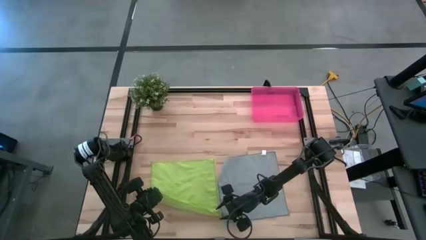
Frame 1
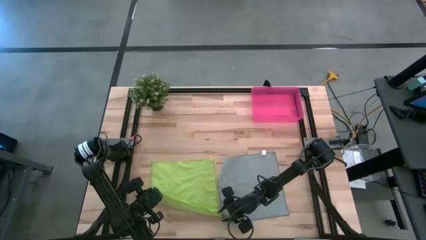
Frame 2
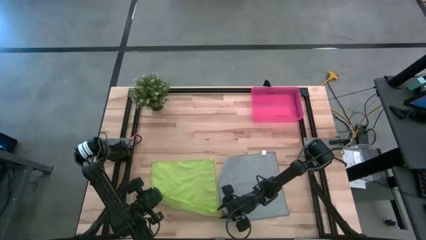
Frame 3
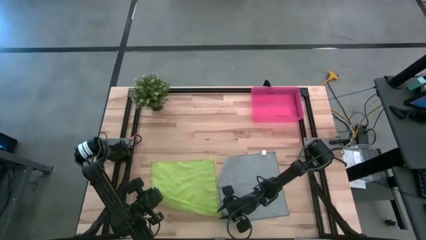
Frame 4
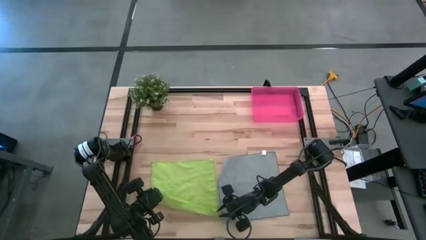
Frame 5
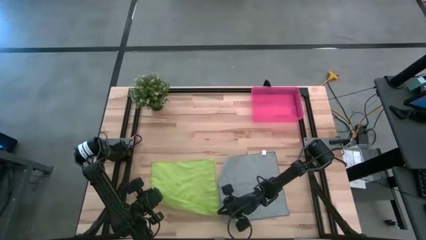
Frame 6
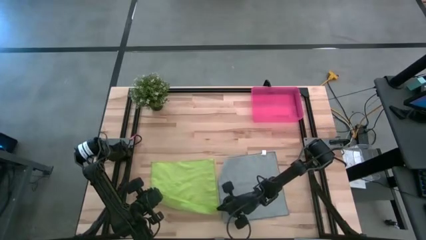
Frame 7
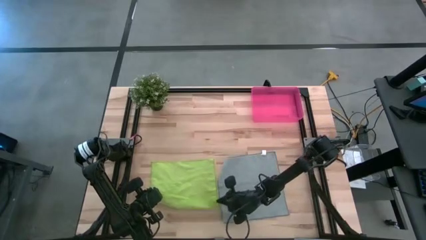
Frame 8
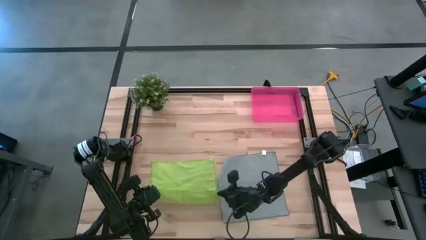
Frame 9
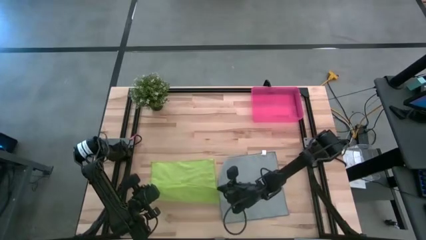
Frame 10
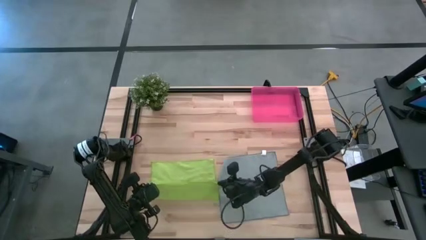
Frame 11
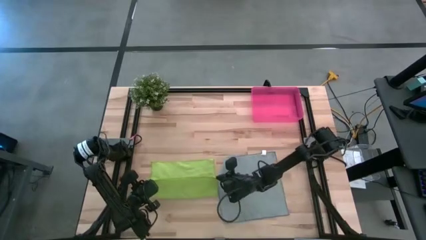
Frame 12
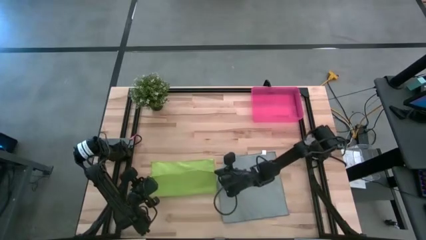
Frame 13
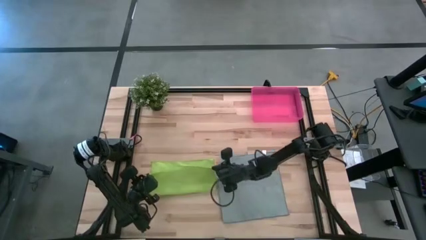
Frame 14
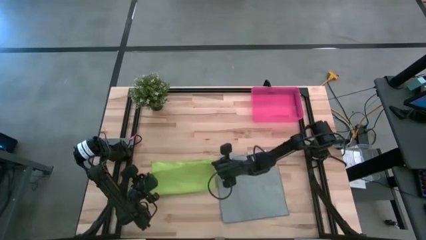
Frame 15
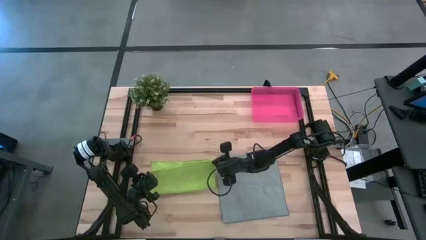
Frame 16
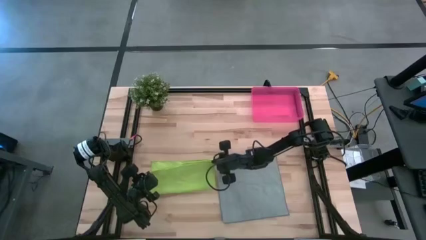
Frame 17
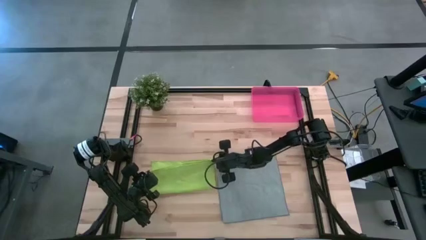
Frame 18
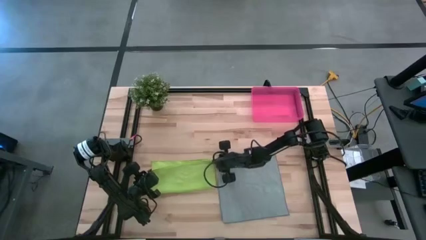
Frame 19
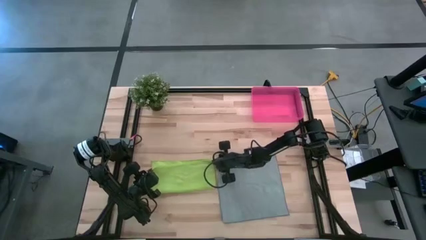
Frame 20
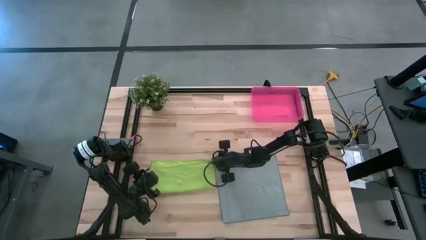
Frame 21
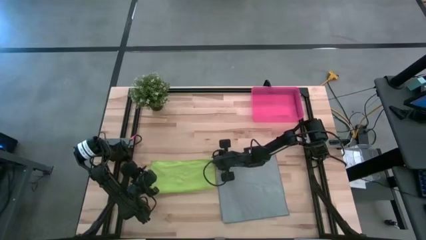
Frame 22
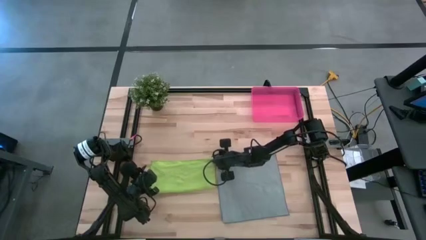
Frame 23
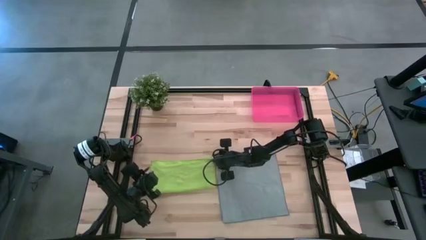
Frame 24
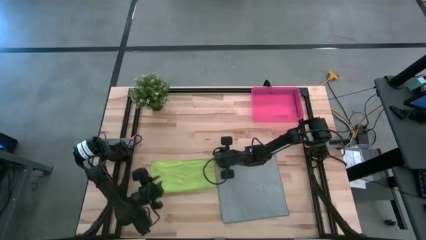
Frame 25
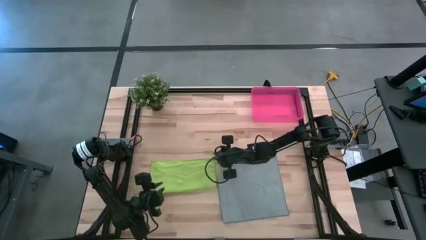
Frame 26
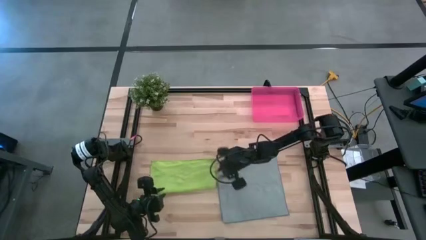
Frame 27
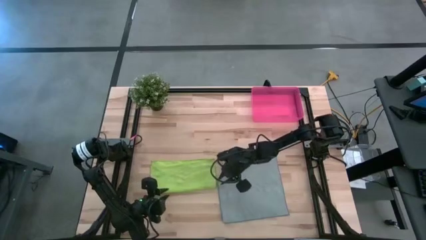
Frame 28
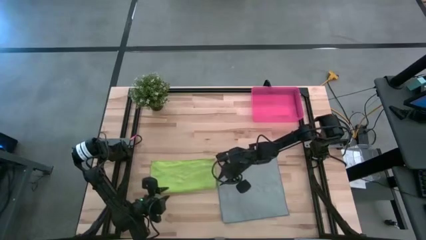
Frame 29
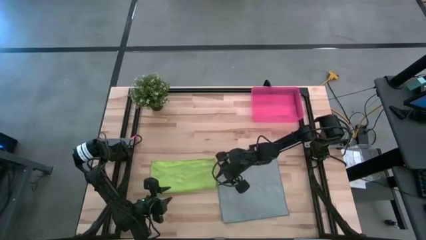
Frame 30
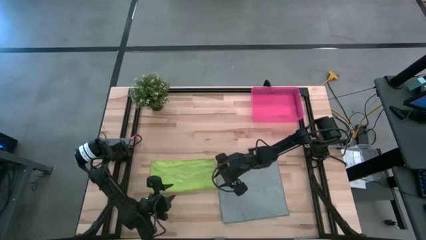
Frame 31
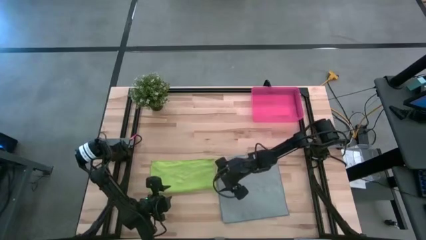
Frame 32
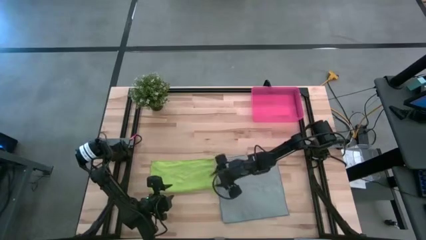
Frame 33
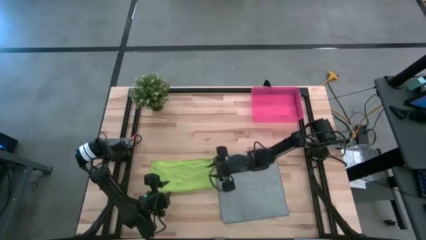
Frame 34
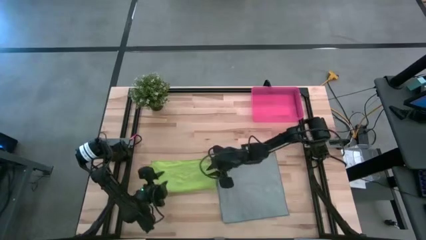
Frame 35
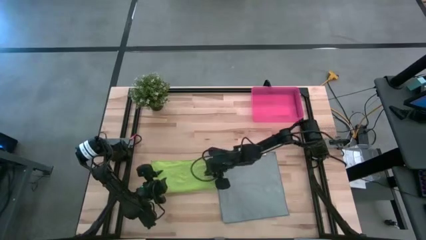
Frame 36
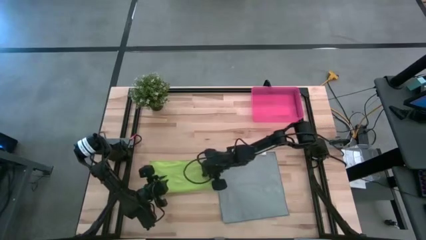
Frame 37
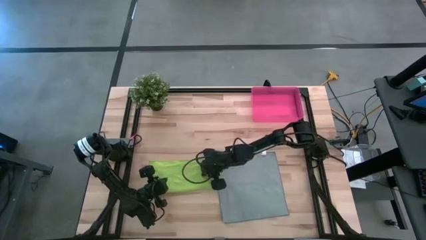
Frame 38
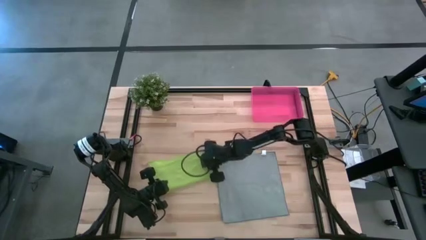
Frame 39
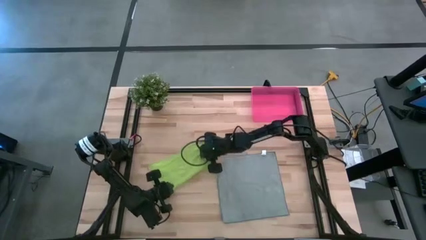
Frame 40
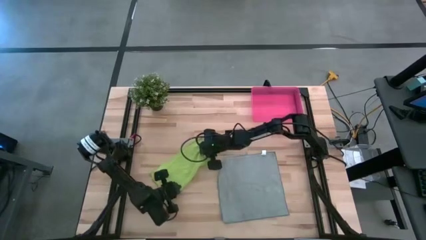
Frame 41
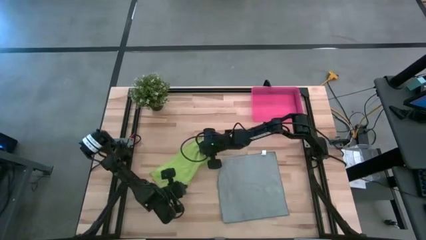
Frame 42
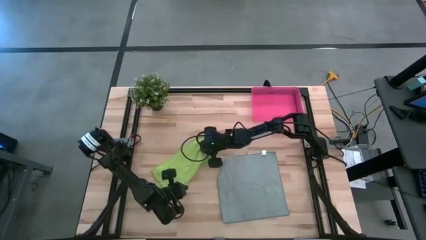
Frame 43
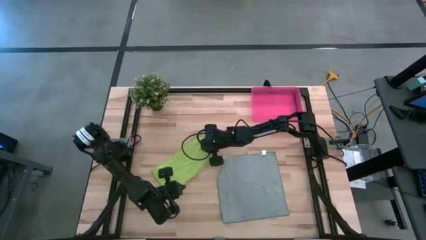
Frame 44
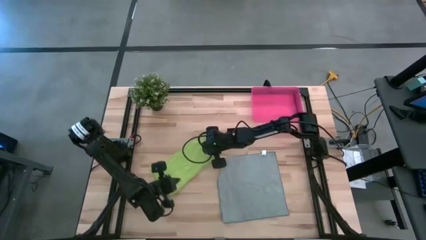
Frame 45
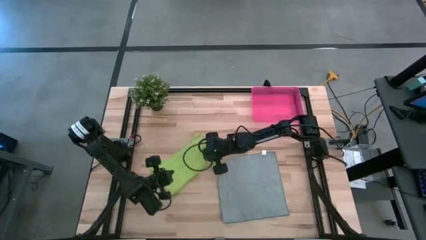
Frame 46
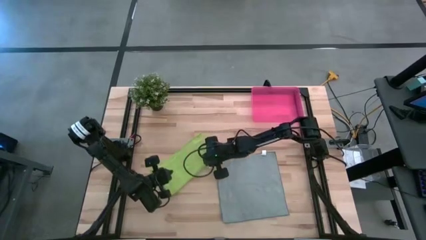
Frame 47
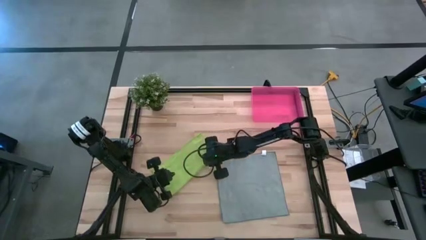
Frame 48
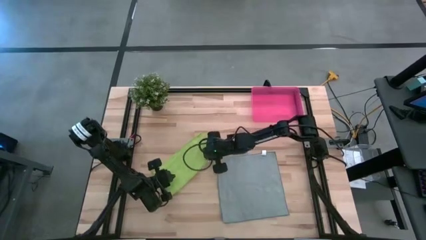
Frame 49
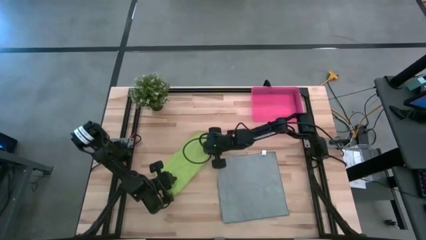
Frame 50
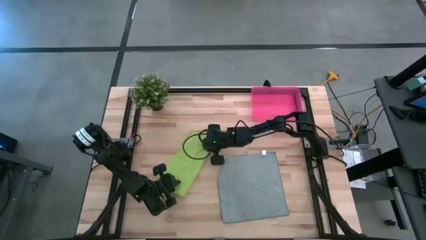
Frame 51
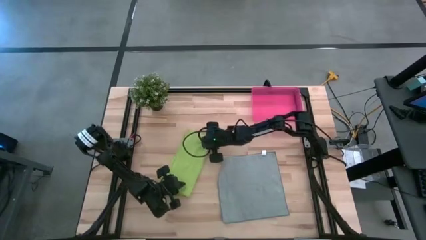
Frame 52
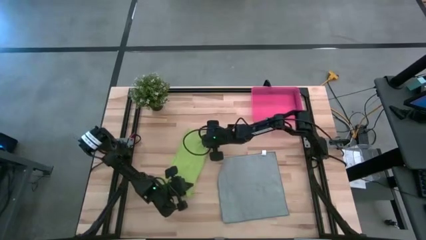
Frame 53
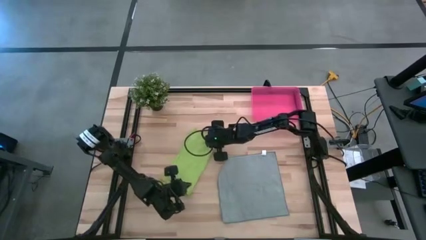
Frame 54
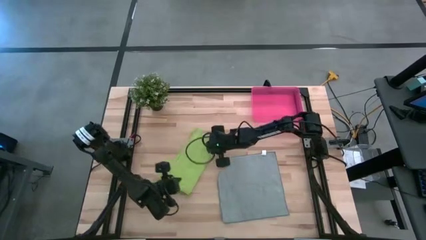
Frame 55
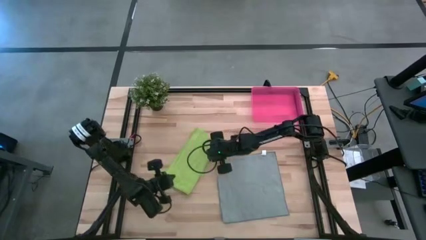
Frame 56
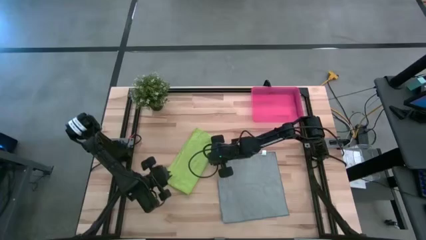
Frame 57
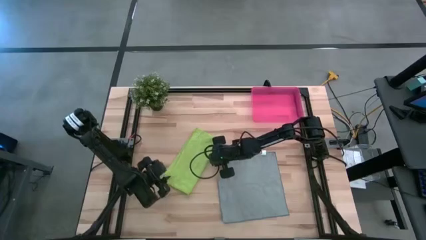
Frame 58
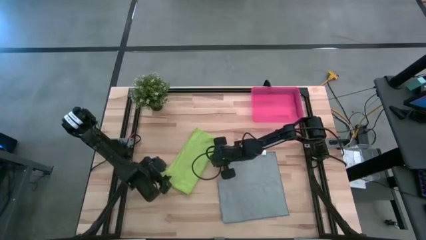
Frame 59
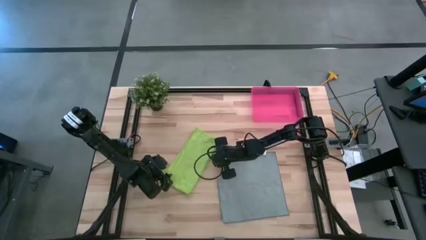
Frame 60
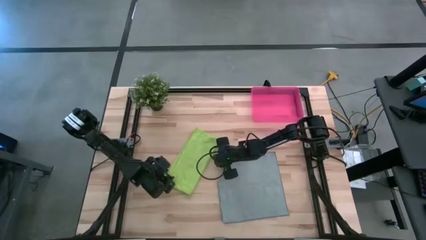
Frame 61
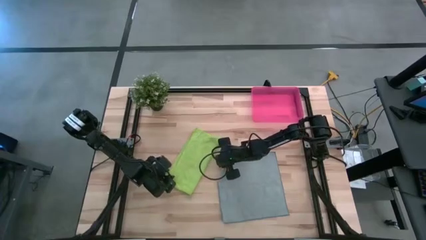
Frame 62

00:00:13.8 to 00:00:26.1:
Task: Roll microfiber towels into tight, uniform cylinder then place into a basket
Fold the green microfiber cloth
